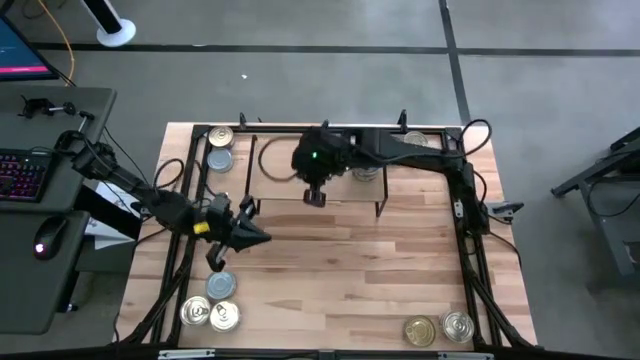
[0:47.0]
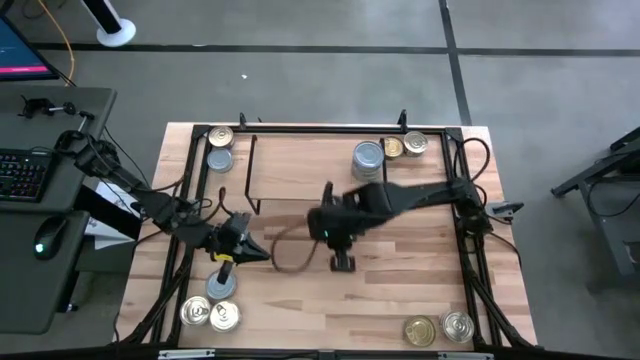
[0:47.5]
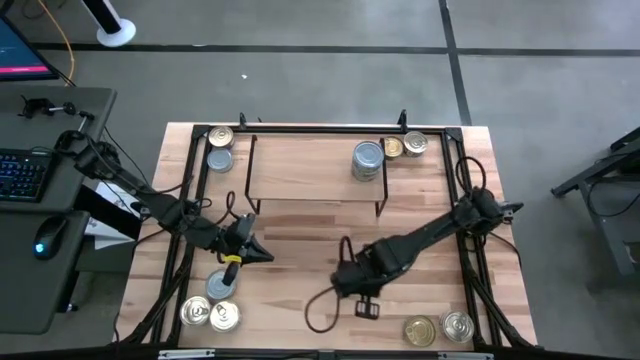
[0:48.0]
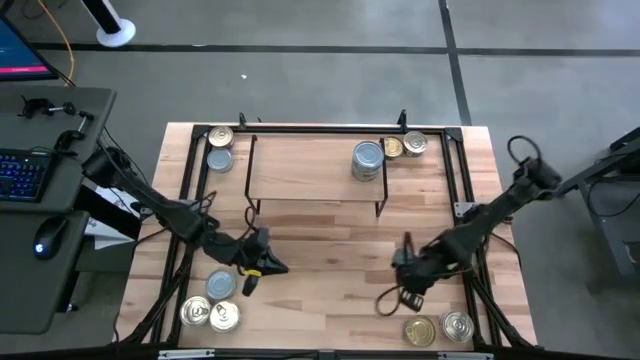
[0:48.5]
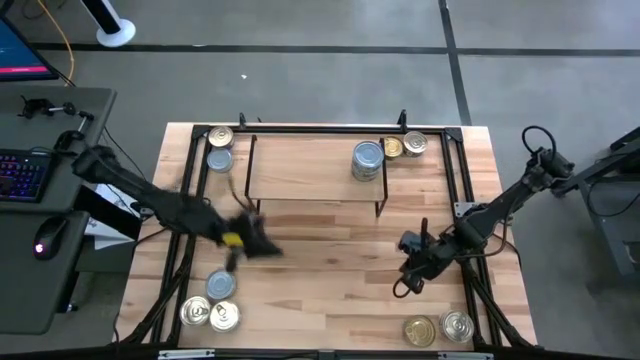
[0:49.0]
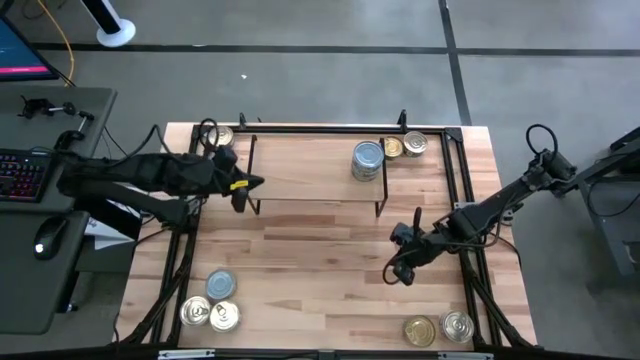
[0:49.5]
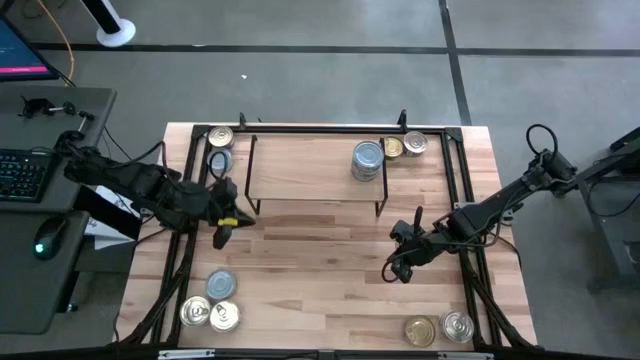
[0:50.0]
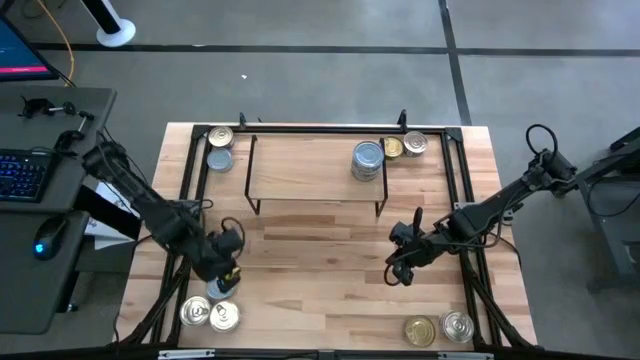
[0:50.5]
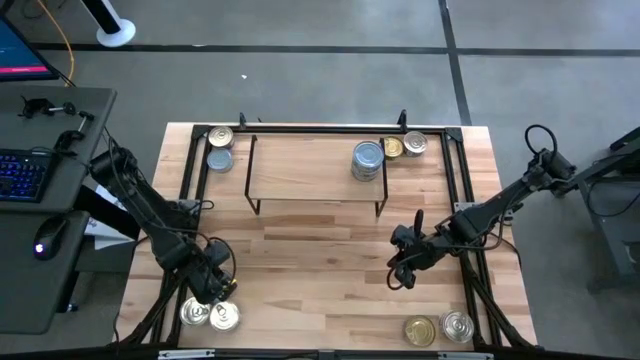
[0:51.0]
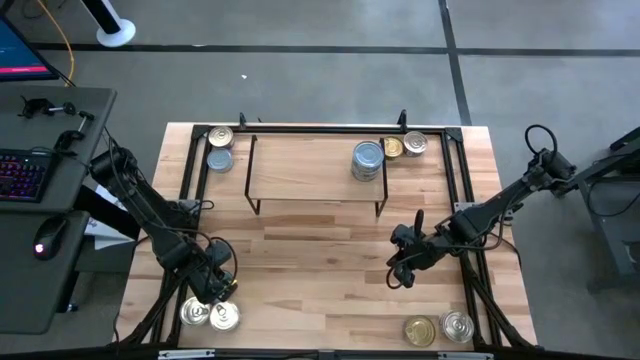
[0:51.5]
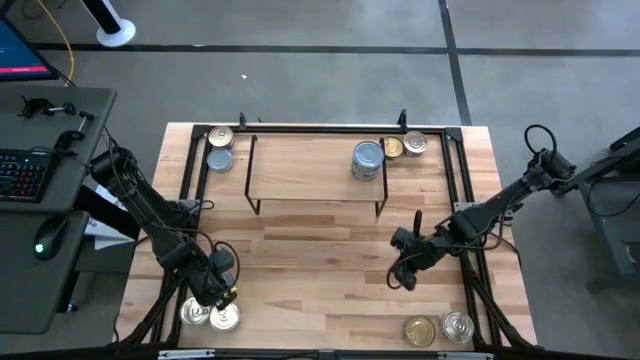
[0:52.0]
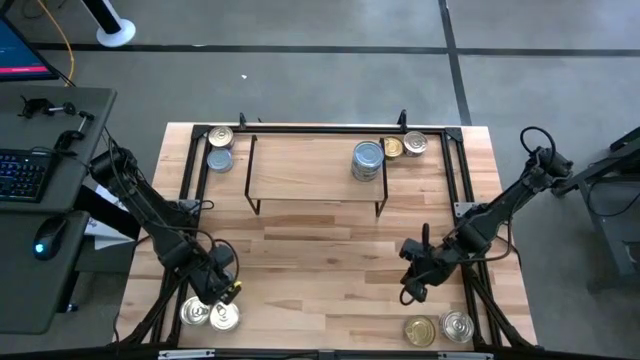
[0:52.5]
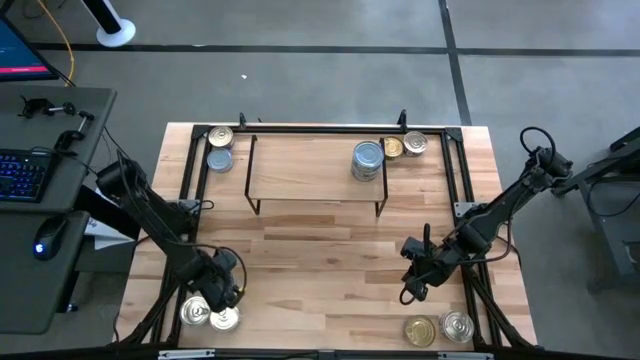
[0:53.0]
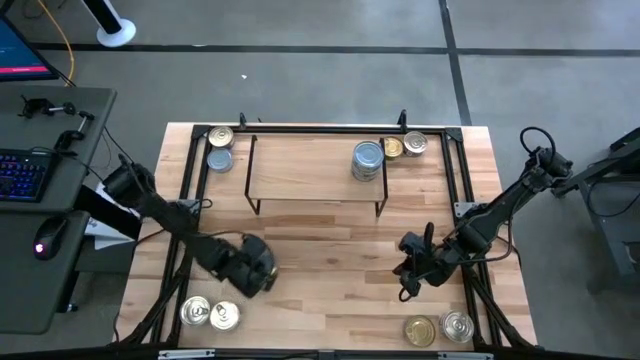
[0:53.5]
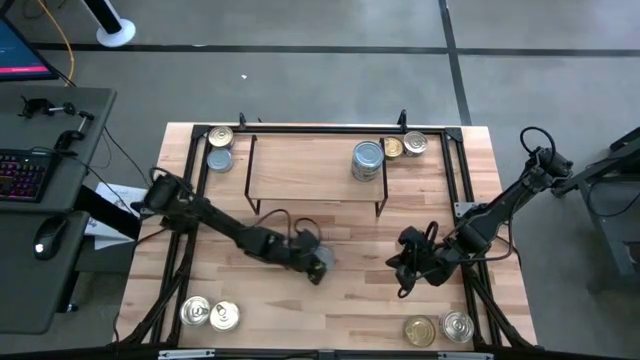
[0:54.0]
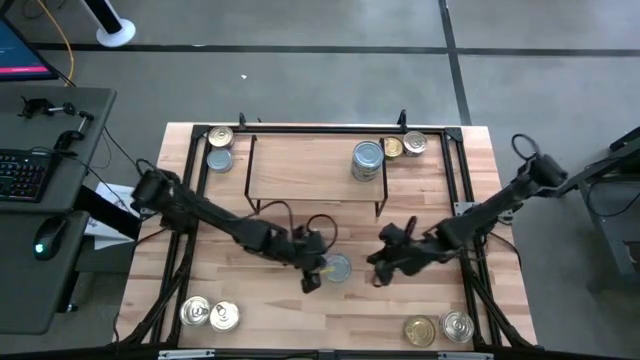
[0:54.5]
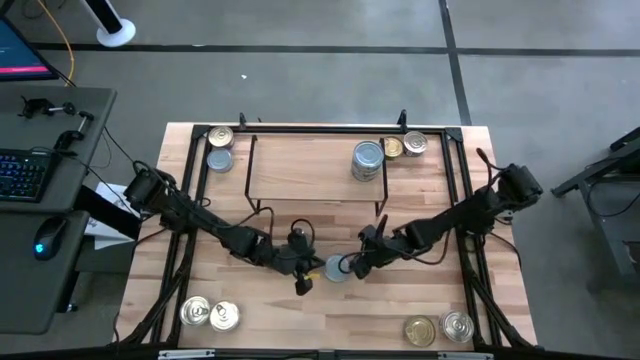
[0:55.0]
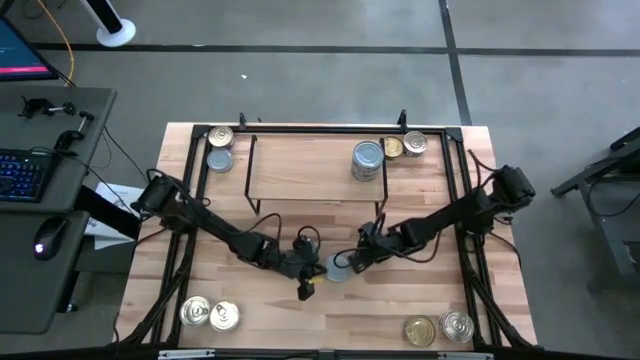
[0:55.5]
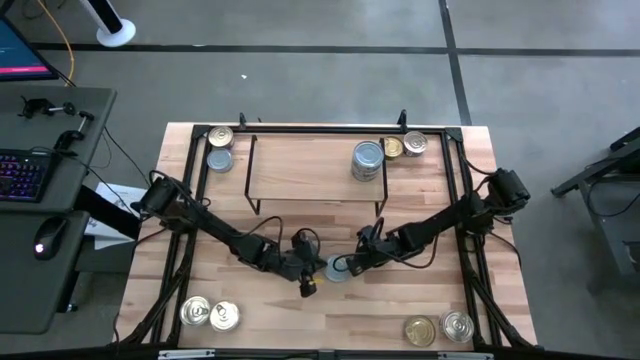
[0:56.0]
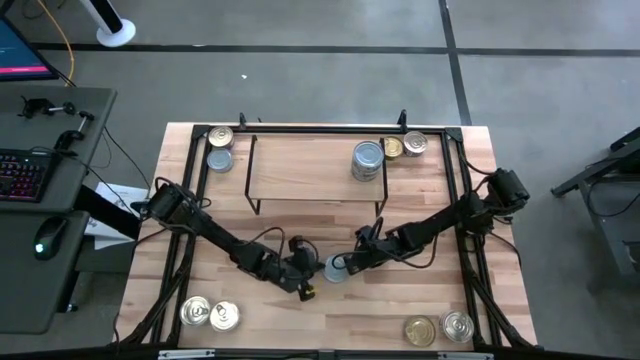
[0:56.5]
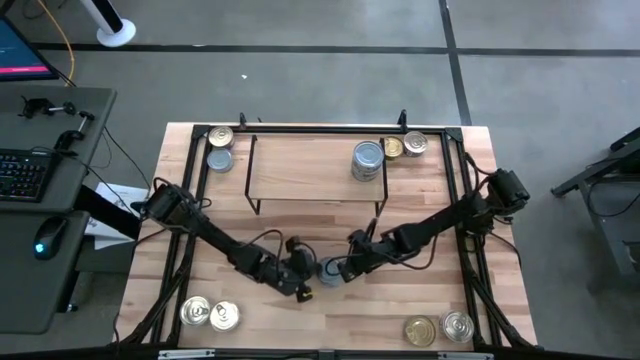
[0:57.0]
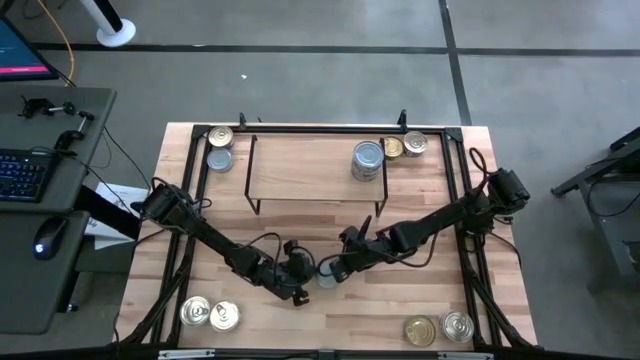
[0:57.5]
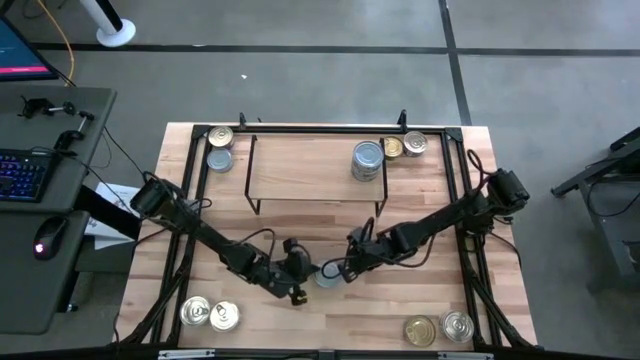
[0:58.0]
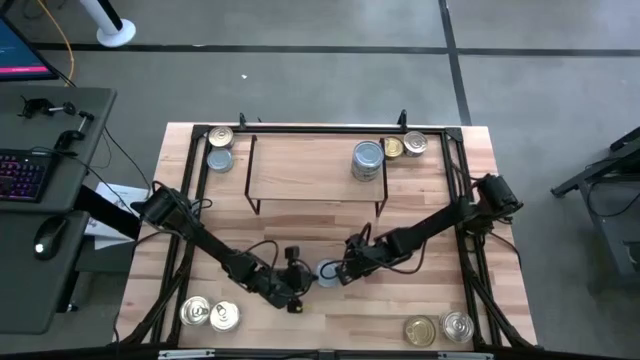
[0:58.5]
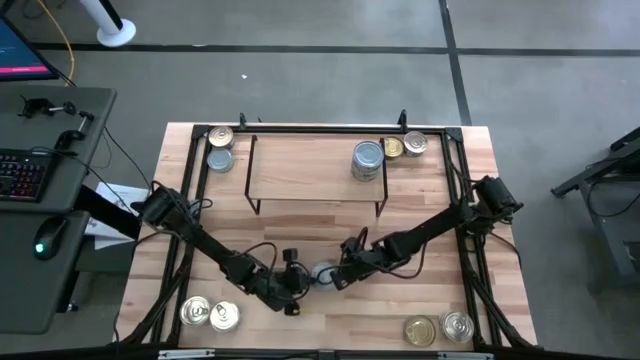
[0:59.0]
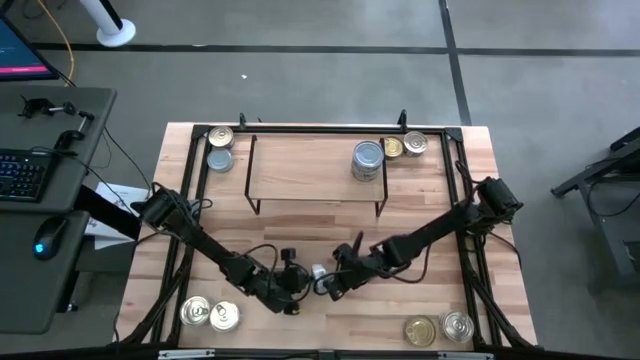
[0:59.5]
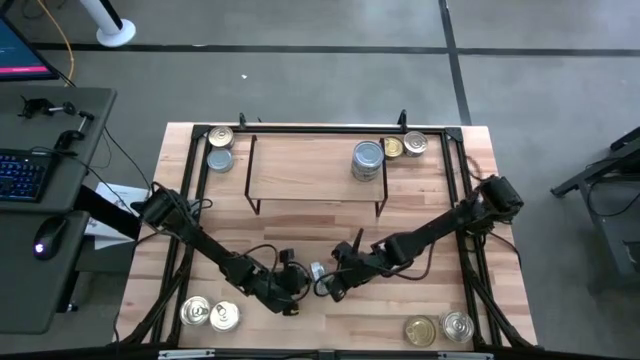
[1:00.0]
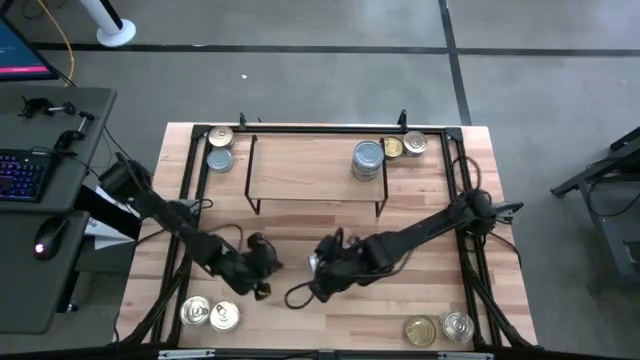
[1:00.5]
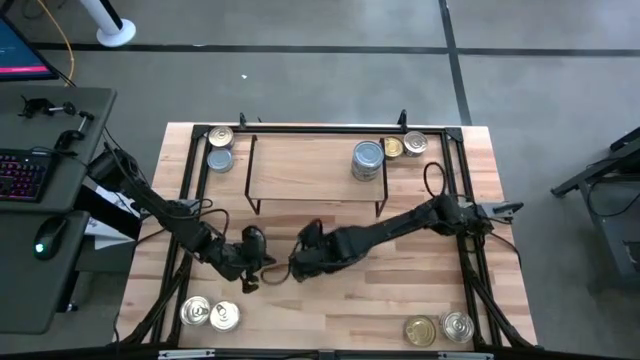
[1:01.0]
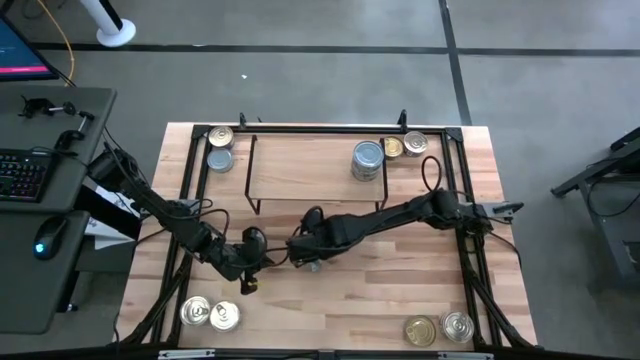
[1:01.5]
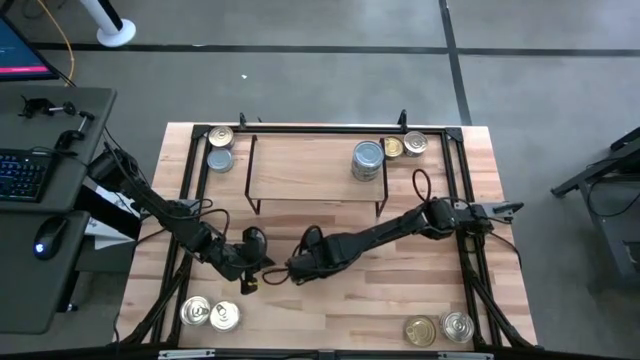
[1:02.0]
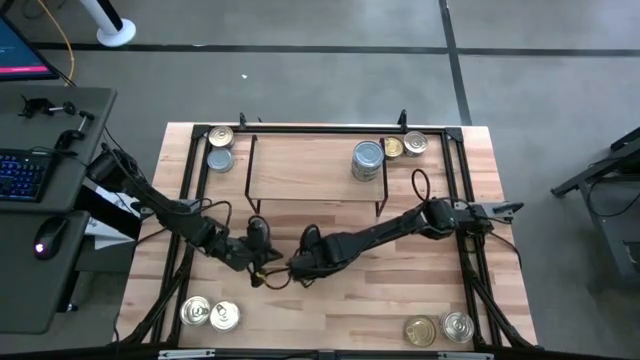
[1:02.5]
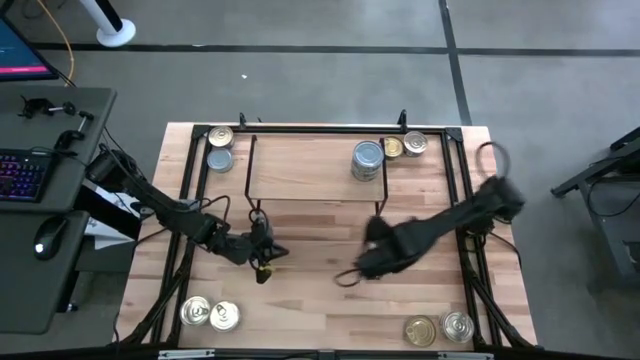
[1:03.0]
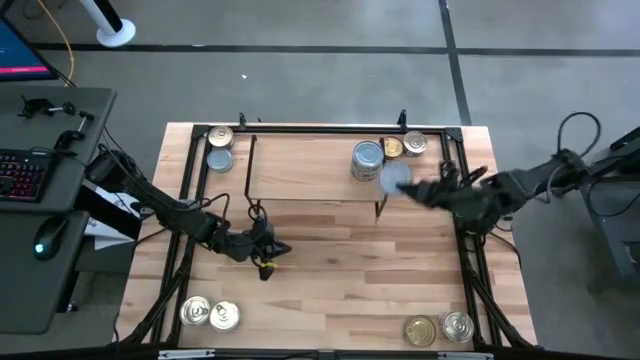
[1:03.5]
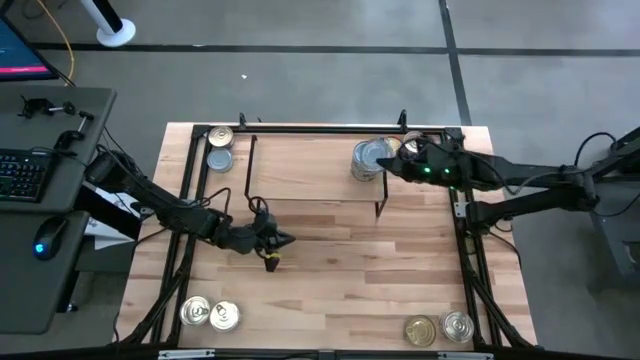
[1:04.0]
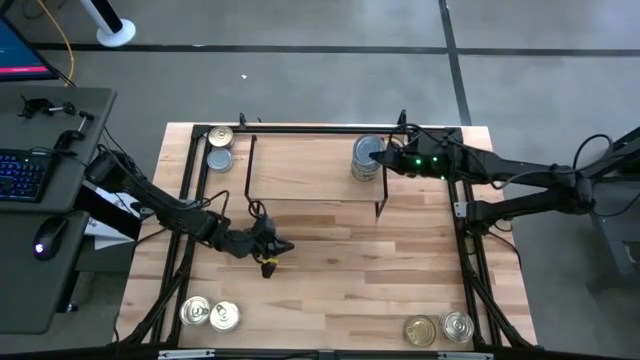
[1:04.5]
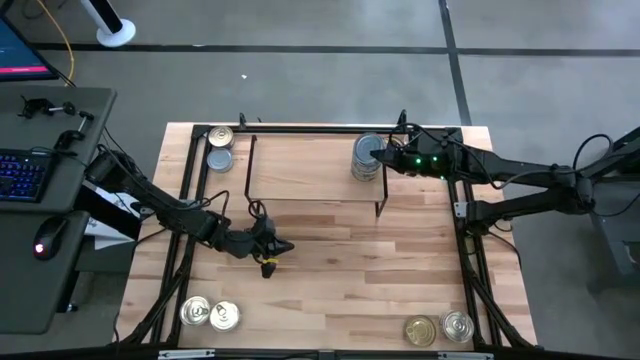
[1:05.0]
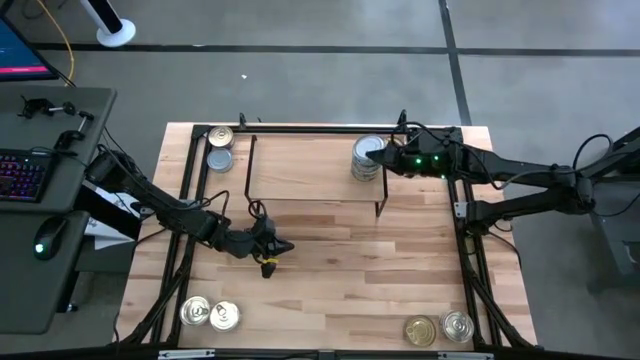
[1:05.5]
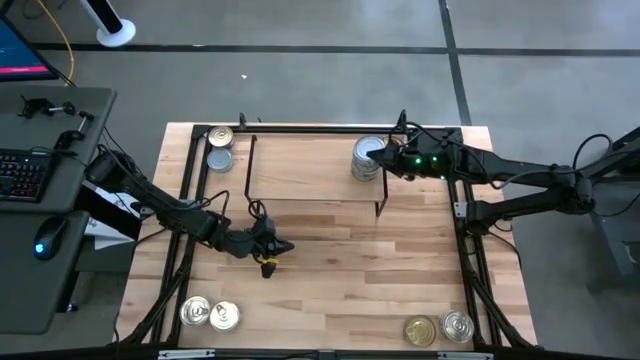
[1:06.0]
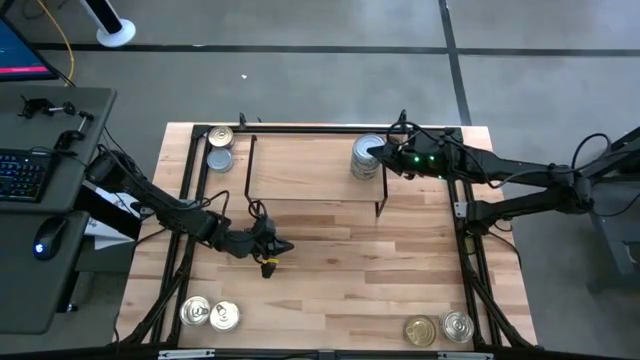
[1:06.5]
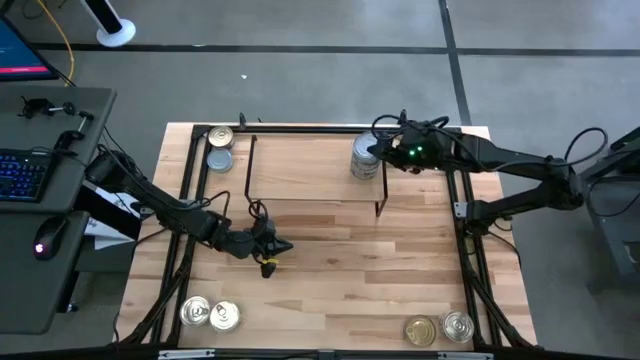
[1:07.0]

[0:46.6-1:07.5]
Task: Stack canned seafood by type on shelf
Stack the green white tuna can on top of the other green white tuna can on the shelf

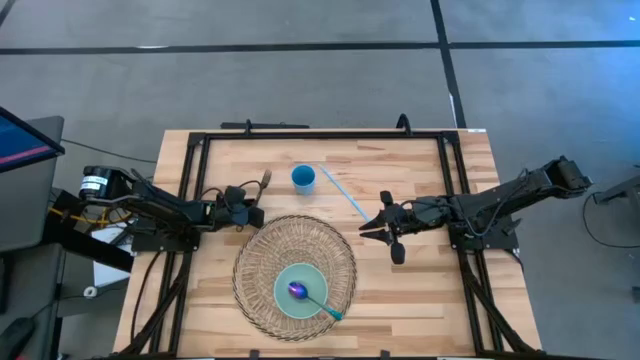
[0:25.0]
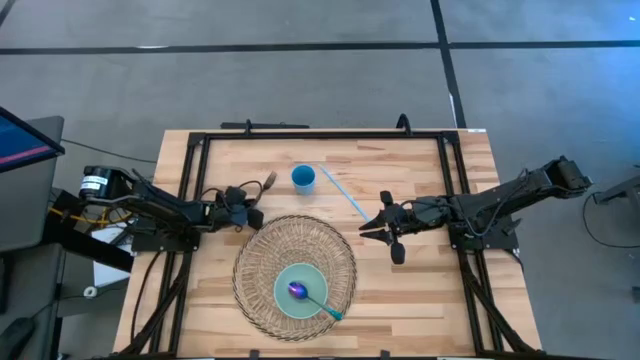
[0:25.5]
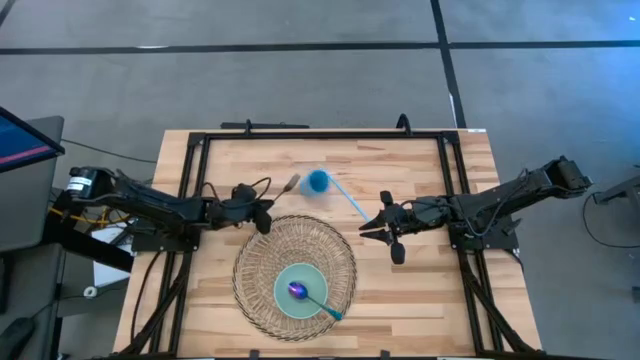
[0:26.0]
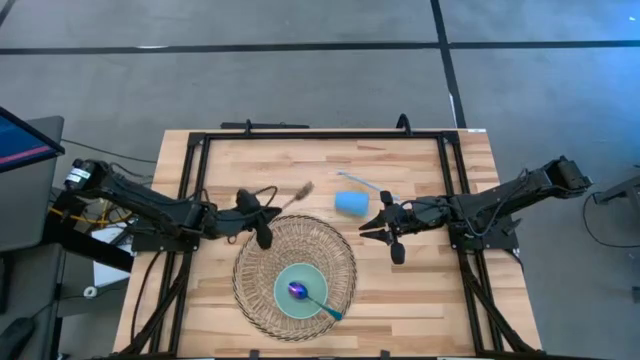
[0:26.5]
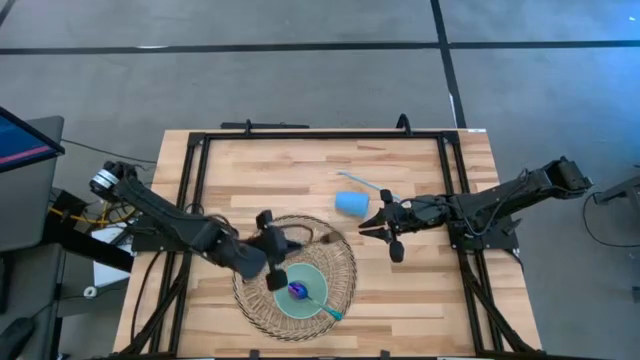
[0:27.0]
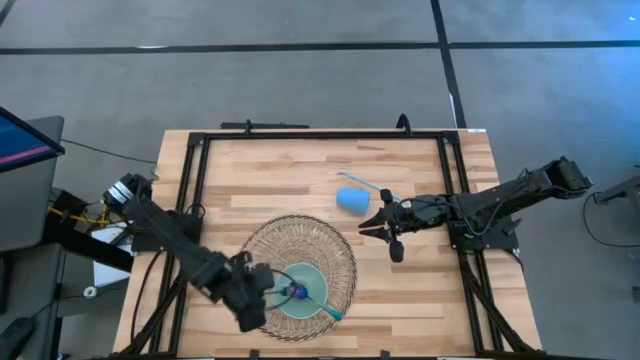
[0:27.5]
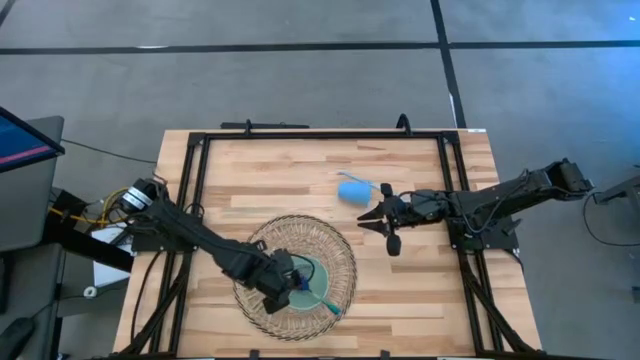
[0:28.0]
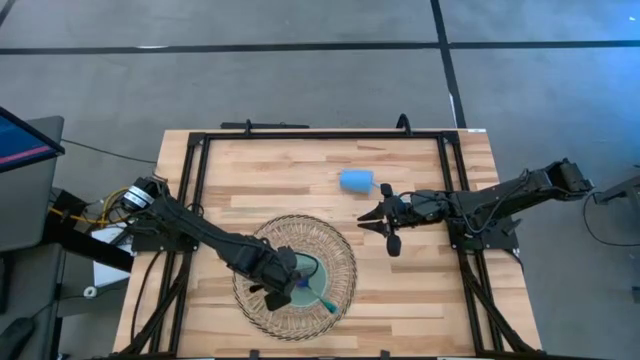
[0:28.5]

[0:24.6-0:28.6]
Task: Pick & Place Utensil
Put the black fork into the green bowl on the woven placemat
